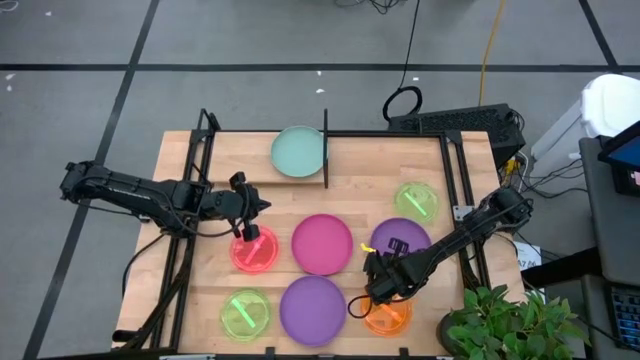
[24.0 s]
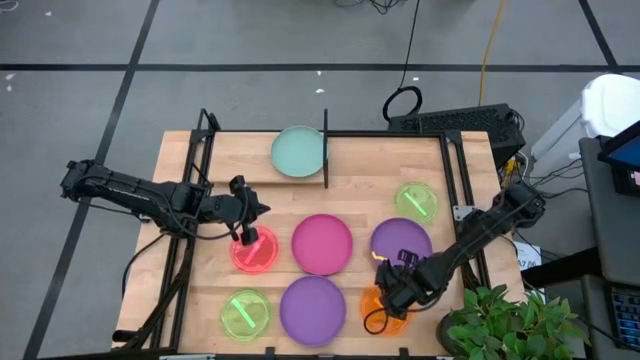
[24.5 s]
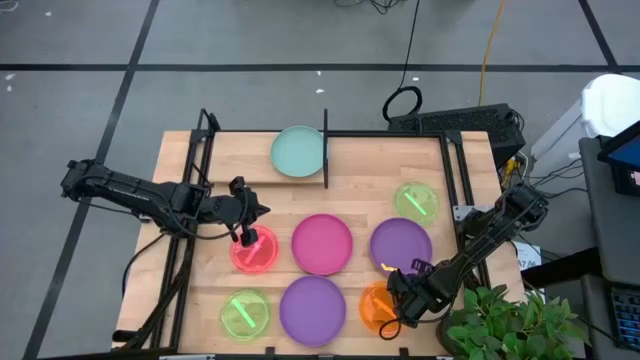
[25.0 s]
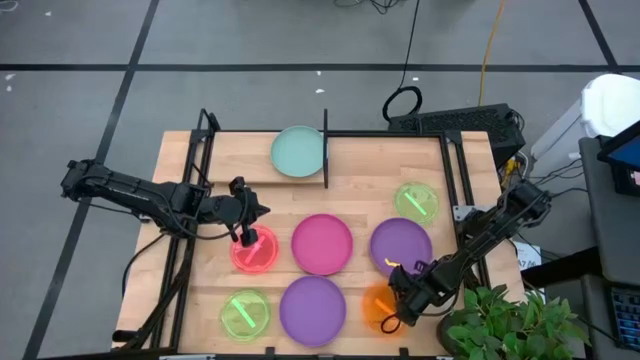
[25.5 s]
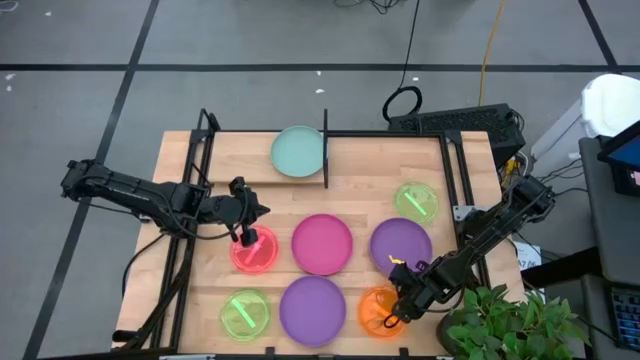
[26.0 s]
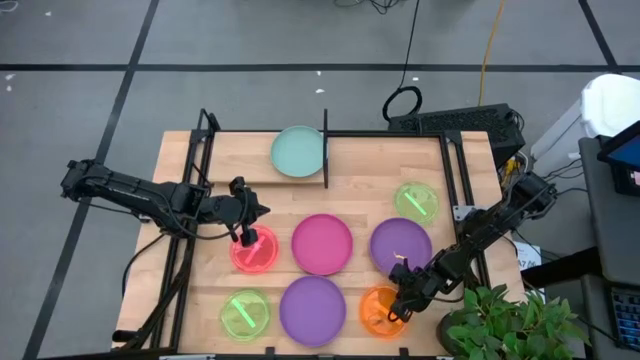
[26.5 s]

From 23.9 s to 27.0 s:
Task: Place and stack plates onto a shelf
Put the orange transparent plate on the shelf

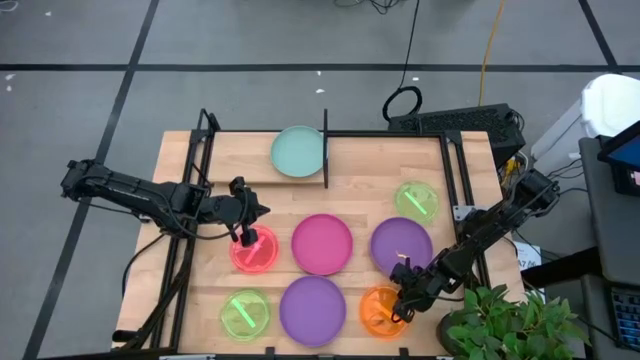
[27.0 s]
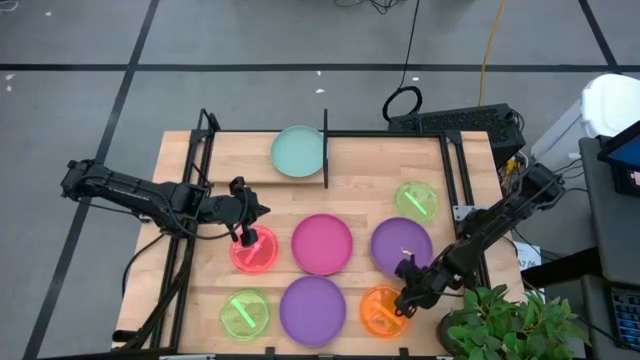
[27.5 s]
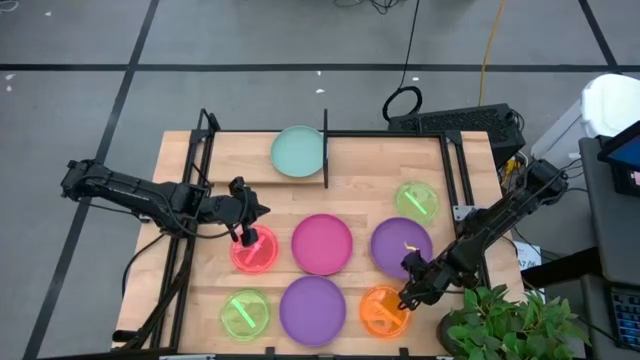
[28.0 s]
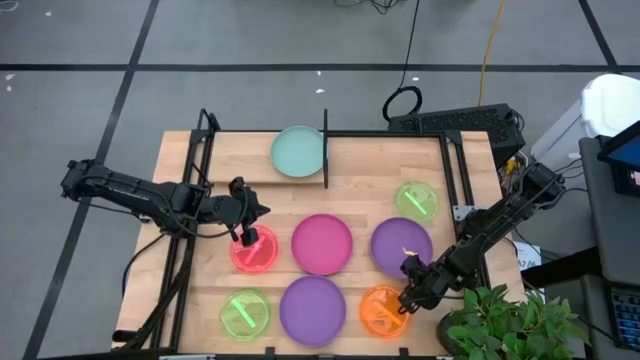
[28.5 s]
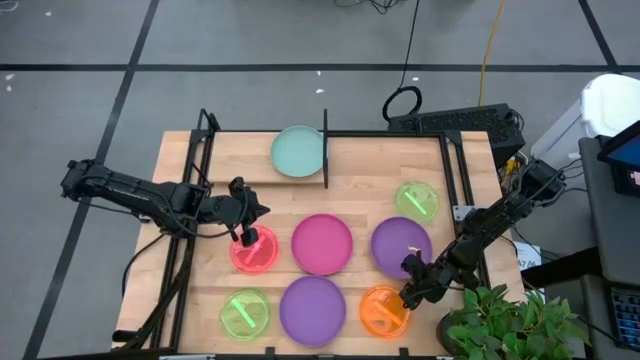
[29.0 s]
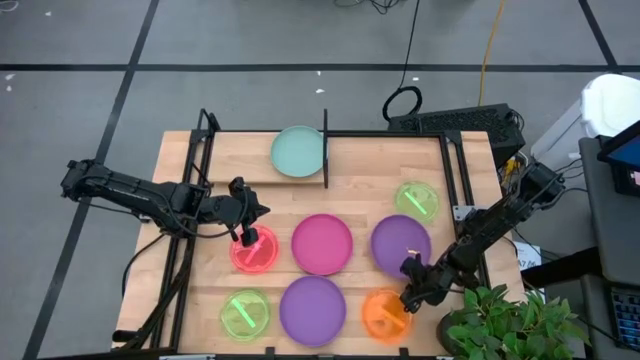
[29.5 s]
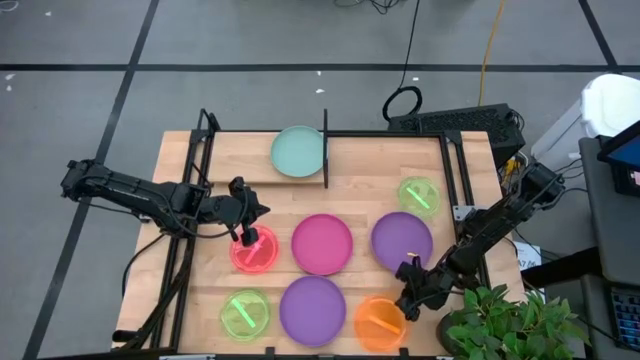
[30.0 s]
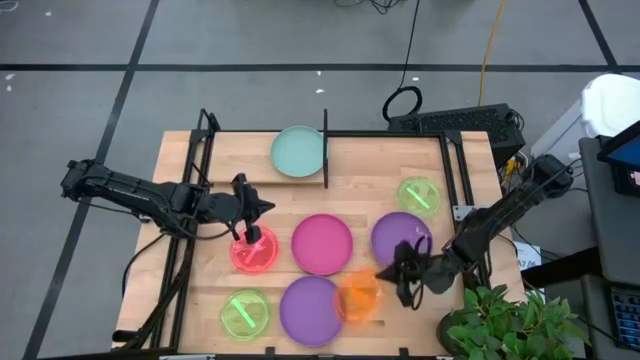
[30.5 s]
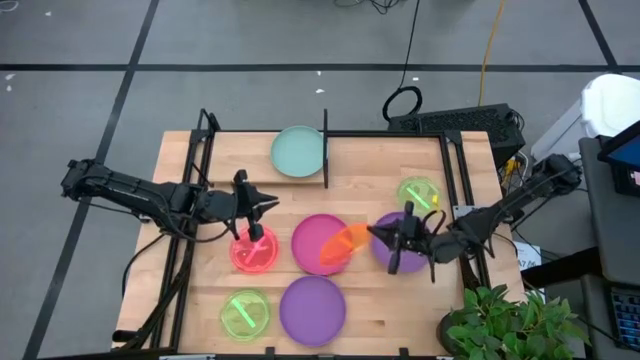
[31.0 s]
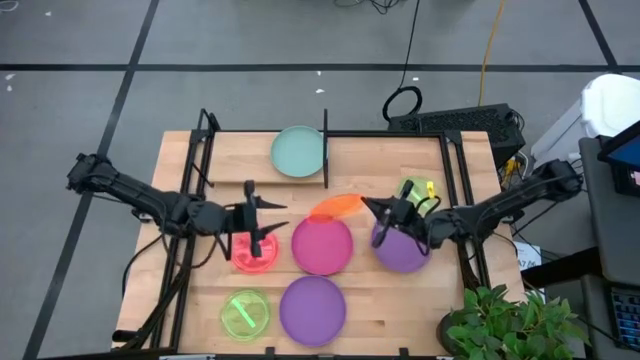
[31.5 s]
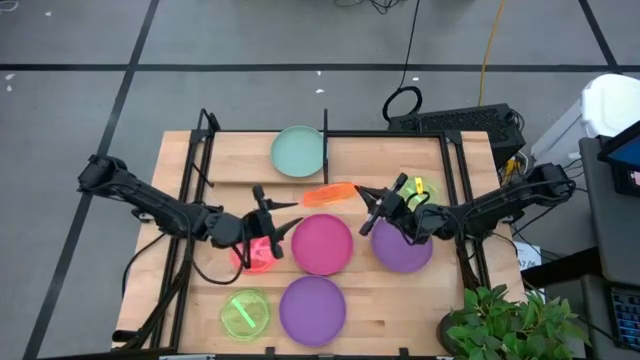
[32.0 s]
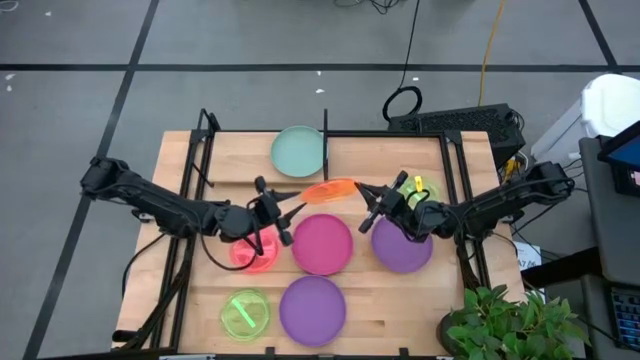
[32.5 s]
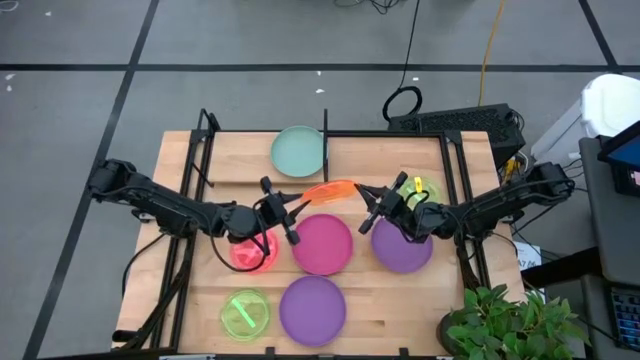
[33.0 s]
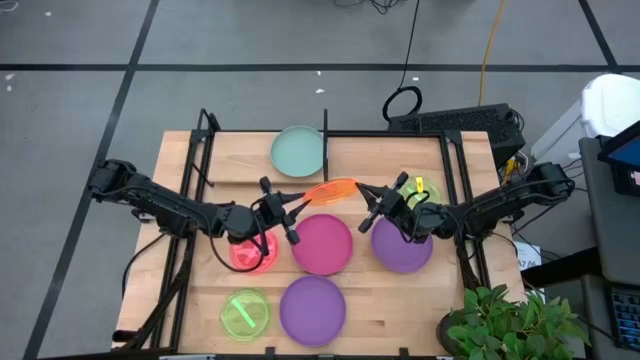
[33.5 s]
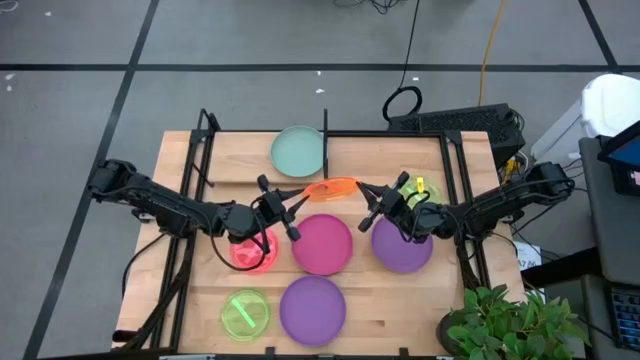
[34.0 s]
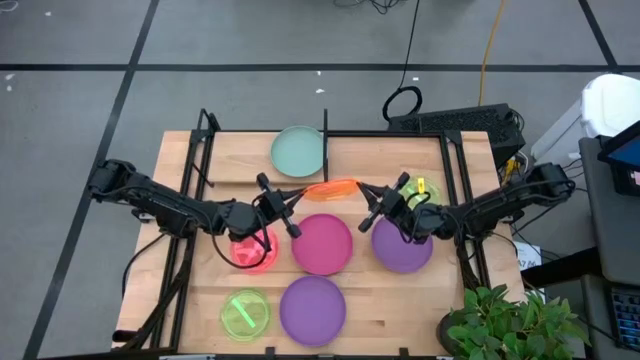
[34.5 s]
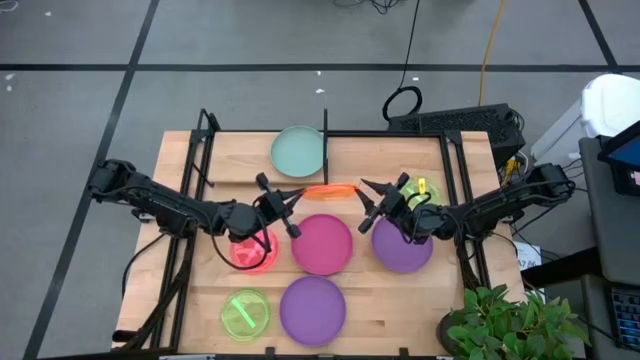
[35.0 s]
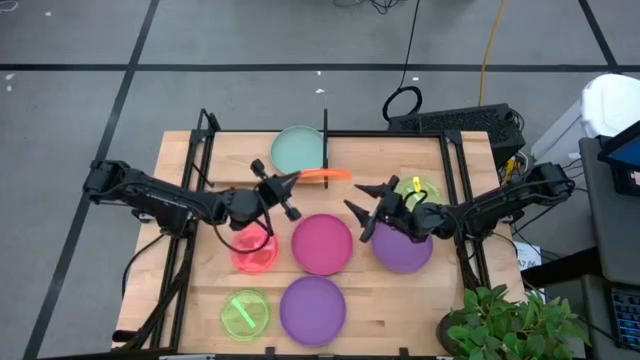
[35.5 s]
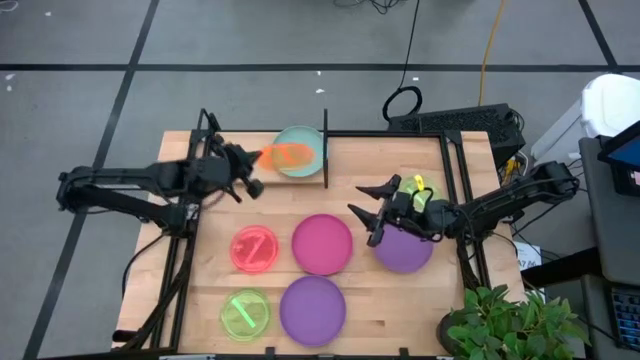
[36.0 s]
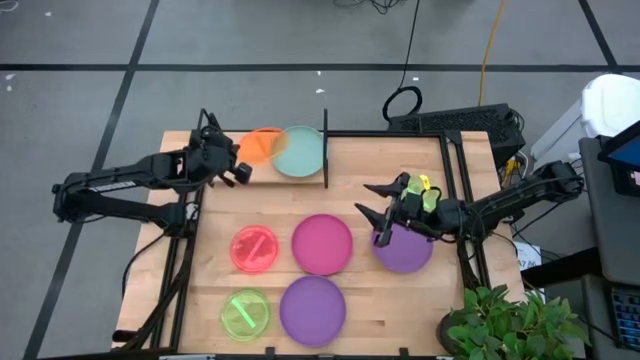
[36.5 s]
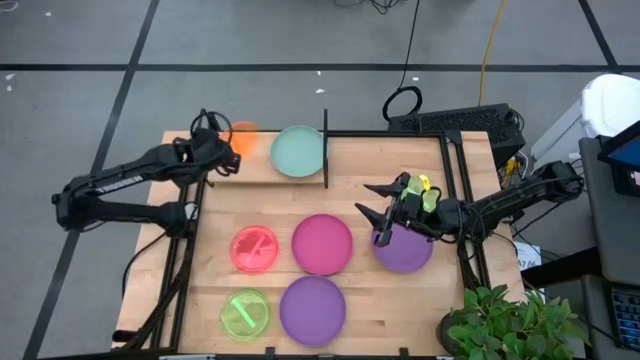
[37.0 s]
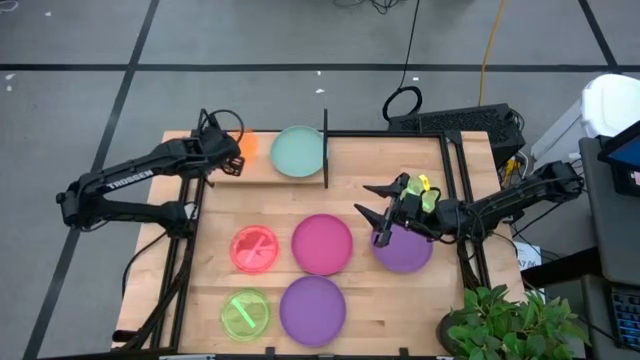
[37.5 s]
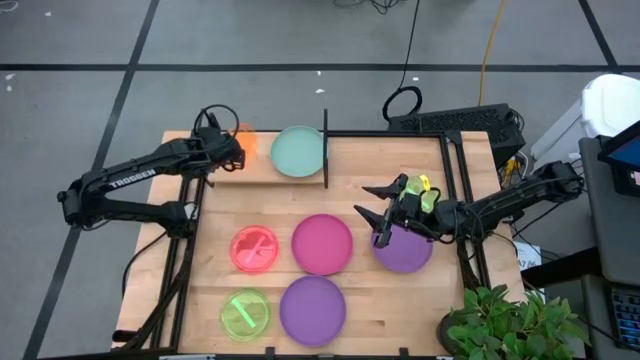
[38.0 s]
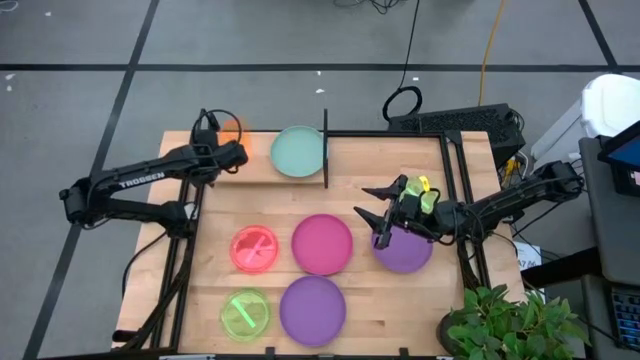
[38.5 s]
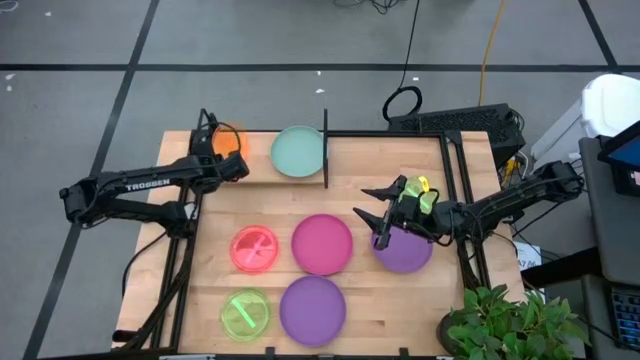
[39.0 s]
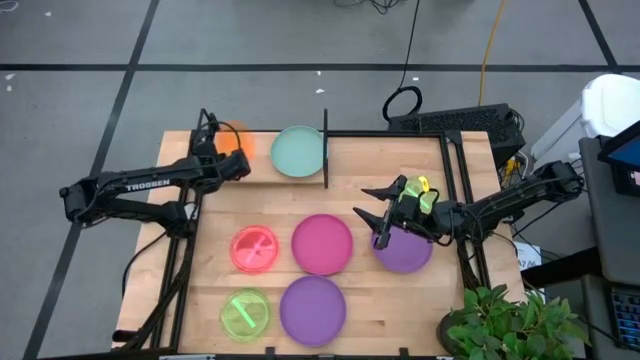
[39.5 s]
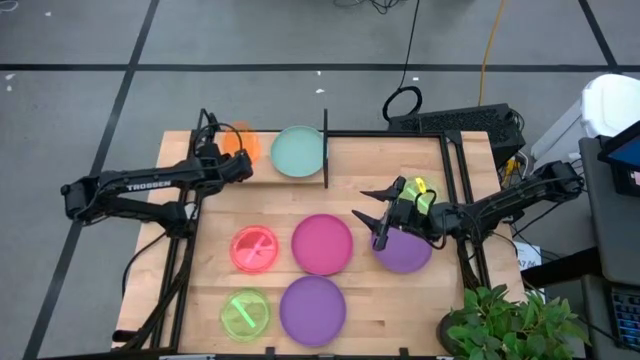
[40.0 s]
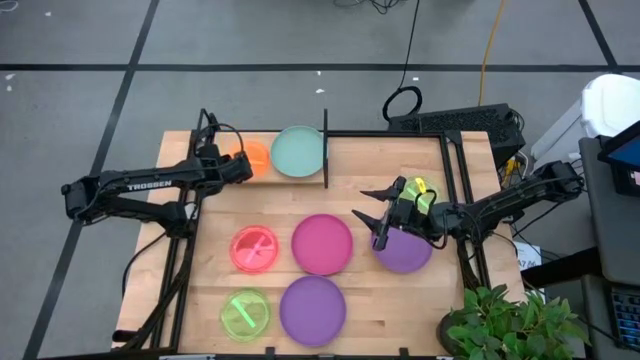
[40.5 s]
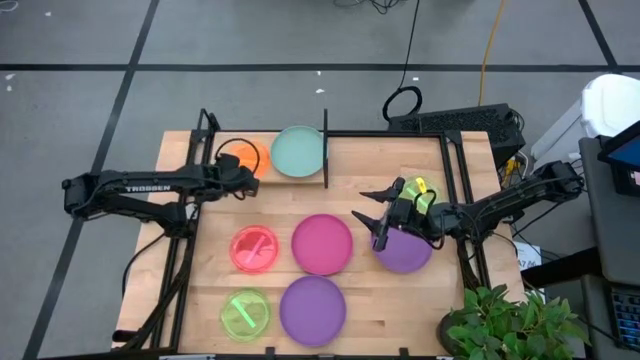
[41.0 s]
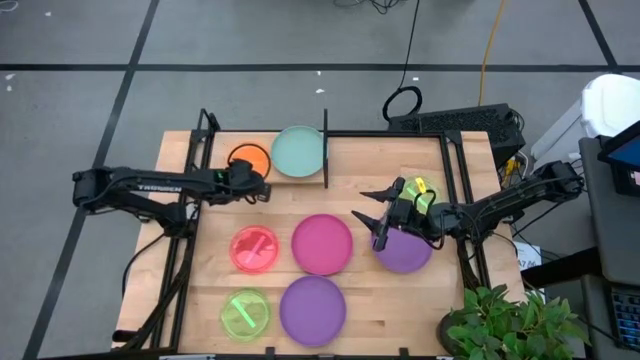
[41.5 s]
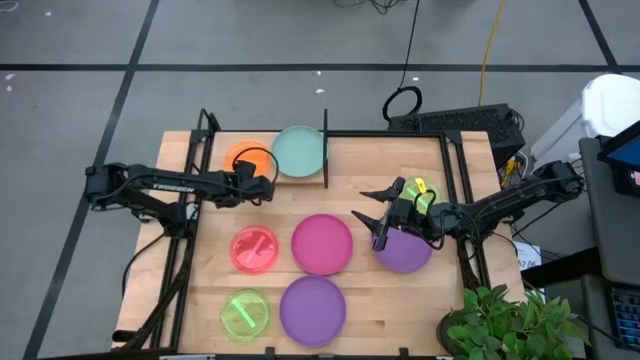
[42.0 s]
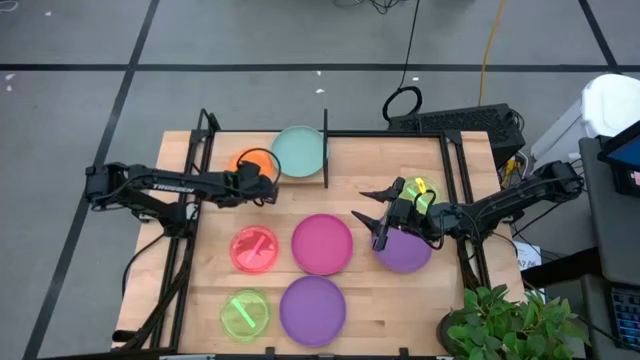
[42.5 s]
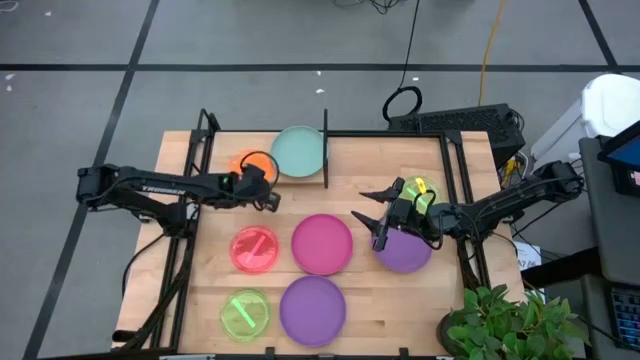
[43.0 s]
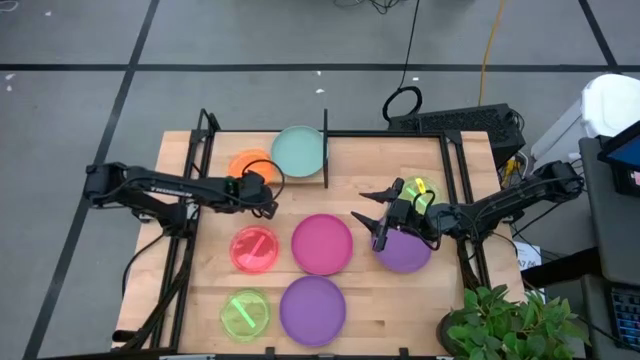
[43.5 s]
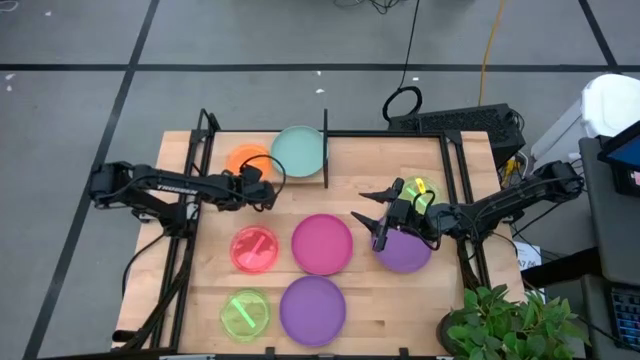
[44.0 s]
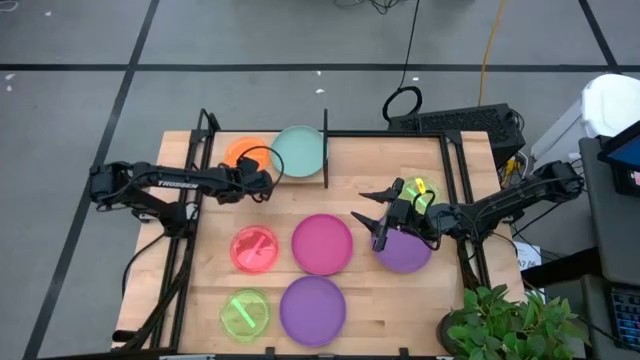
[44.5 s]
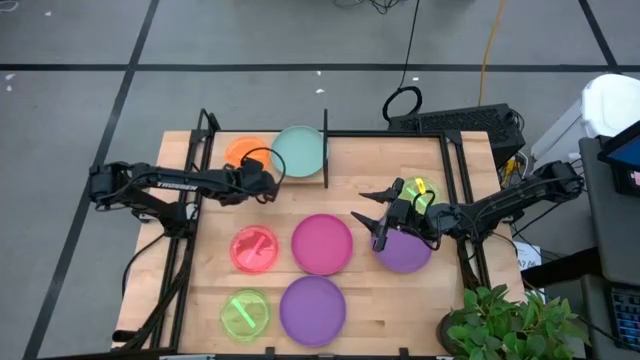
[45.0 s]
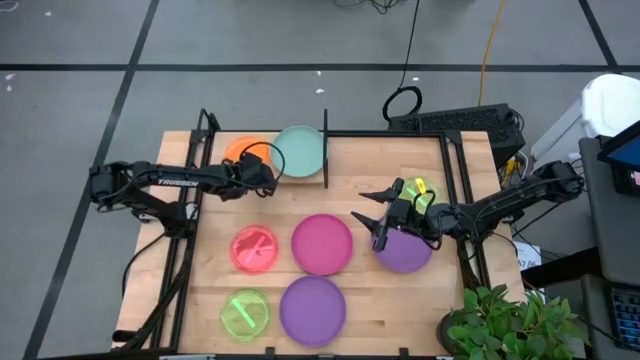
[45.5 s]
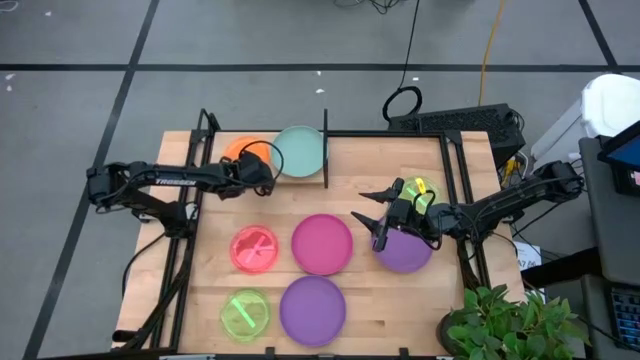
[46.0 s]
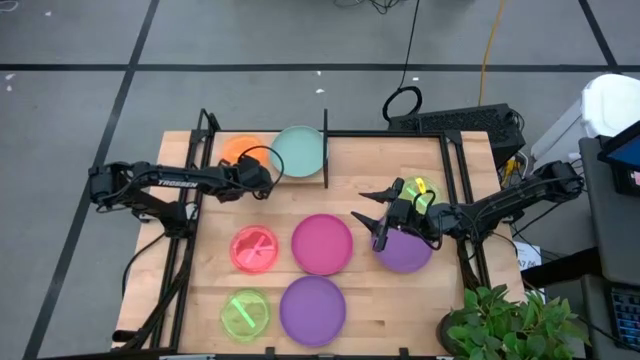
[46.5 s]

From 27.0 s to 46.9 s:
Put the transparent orange plate on the shelf
